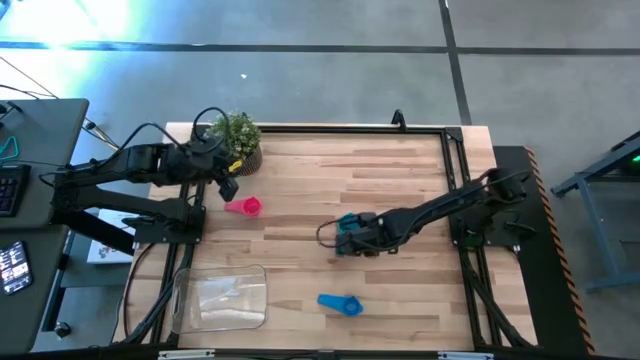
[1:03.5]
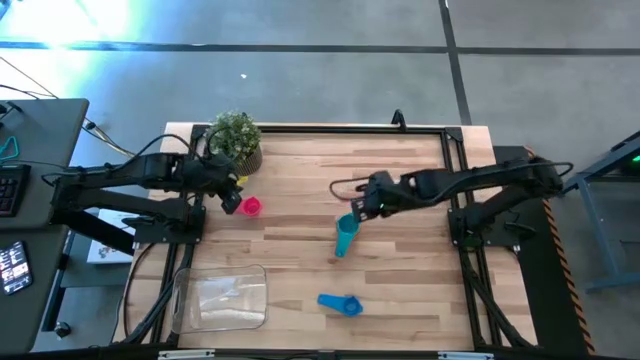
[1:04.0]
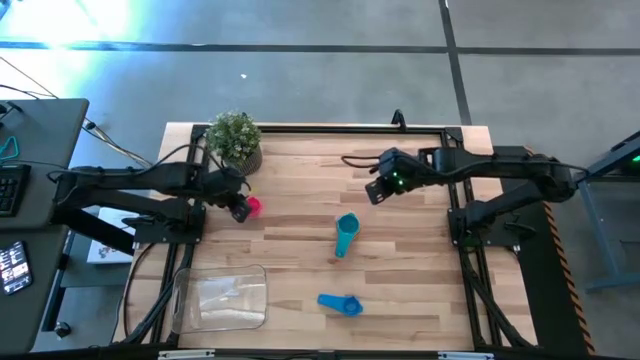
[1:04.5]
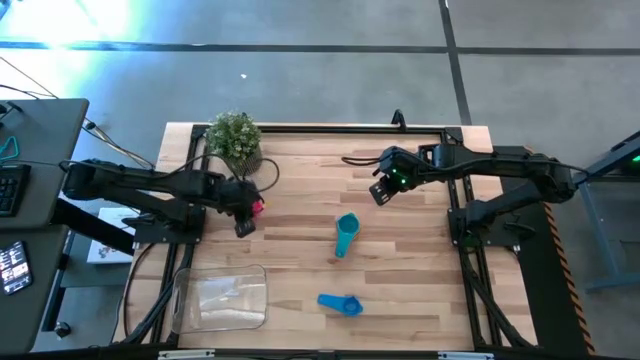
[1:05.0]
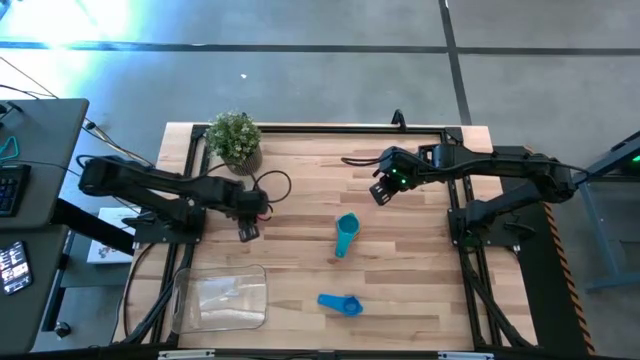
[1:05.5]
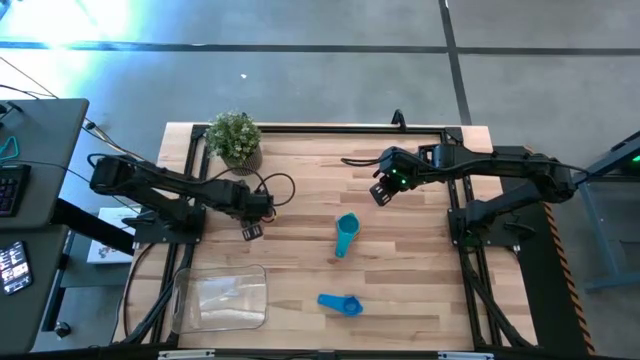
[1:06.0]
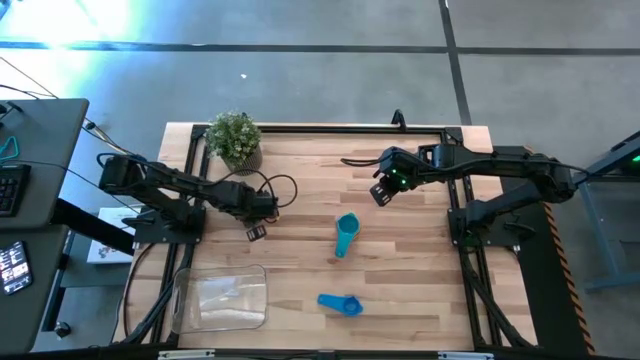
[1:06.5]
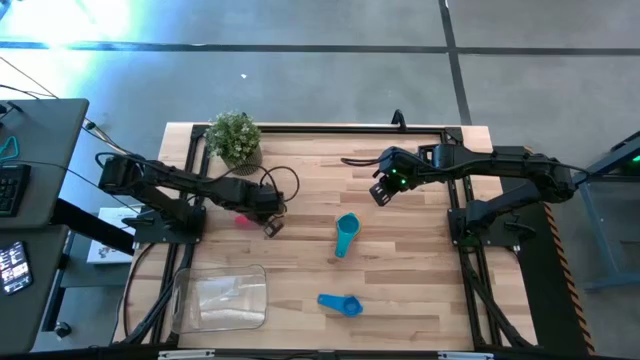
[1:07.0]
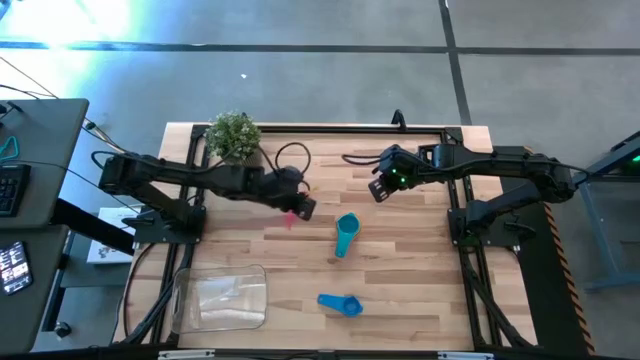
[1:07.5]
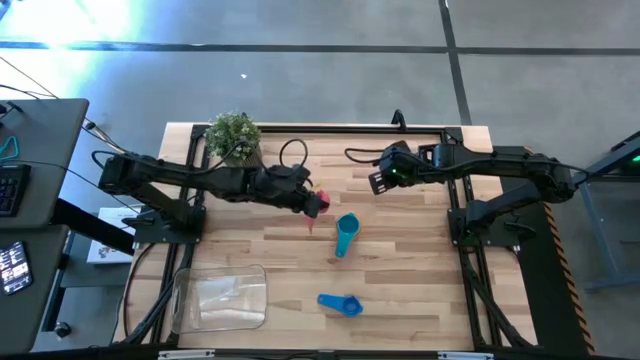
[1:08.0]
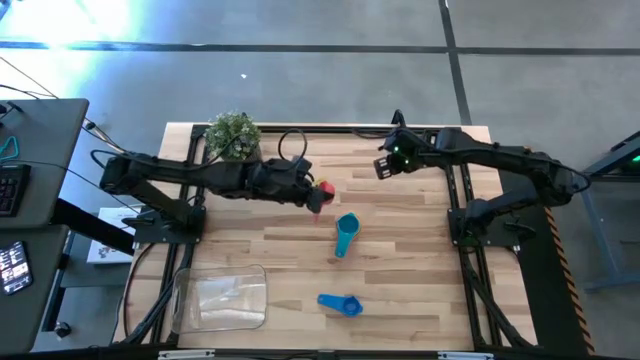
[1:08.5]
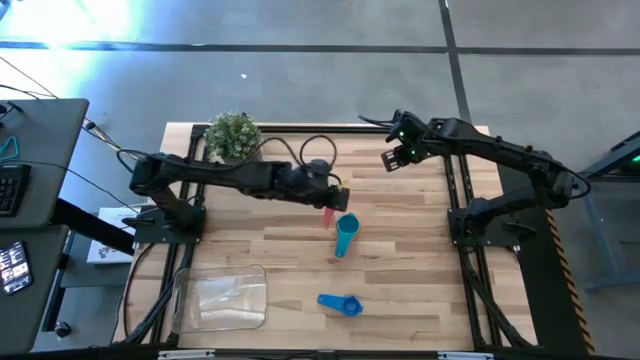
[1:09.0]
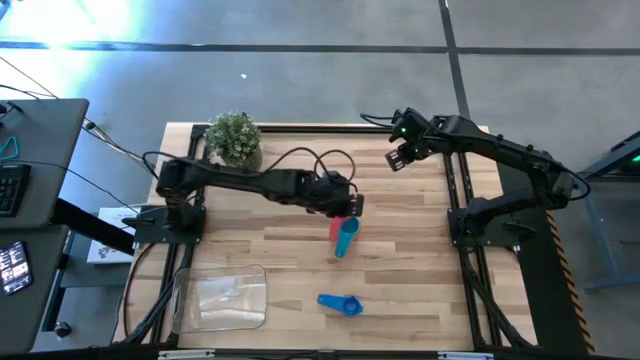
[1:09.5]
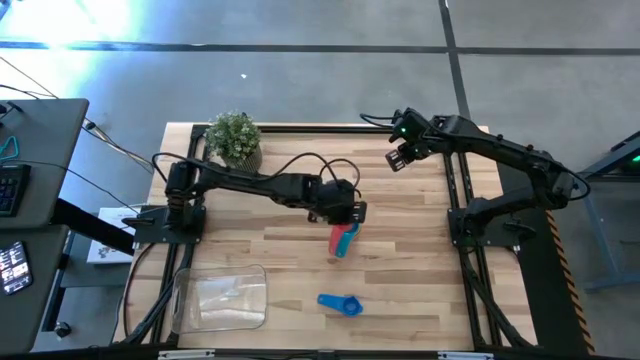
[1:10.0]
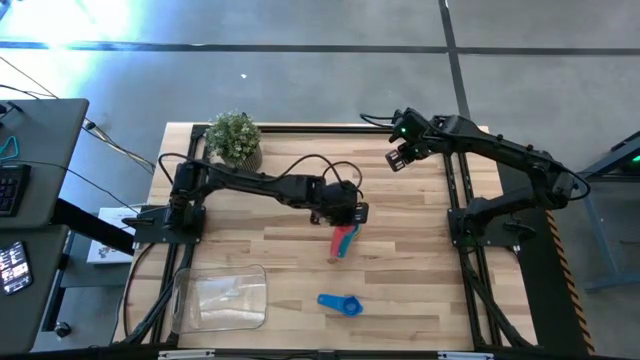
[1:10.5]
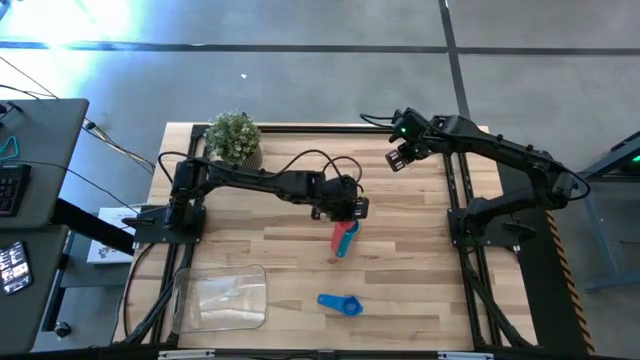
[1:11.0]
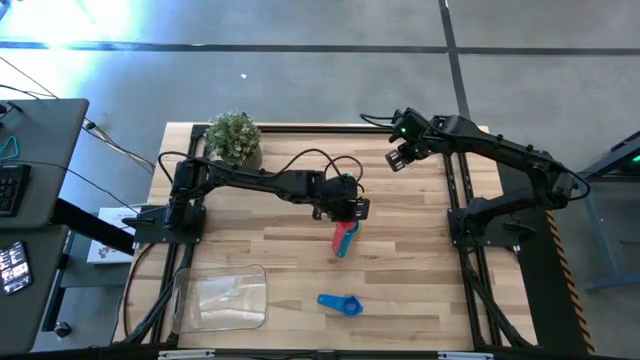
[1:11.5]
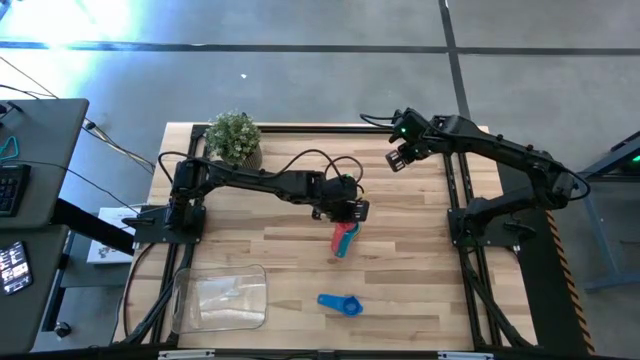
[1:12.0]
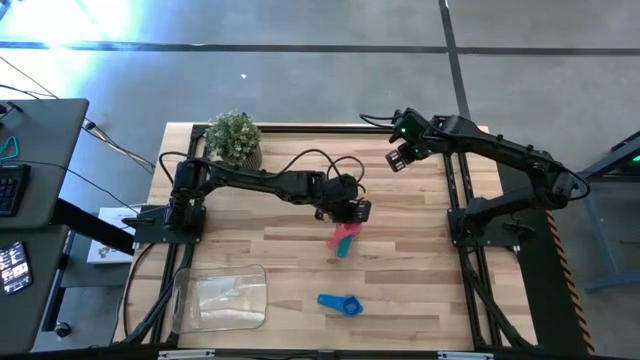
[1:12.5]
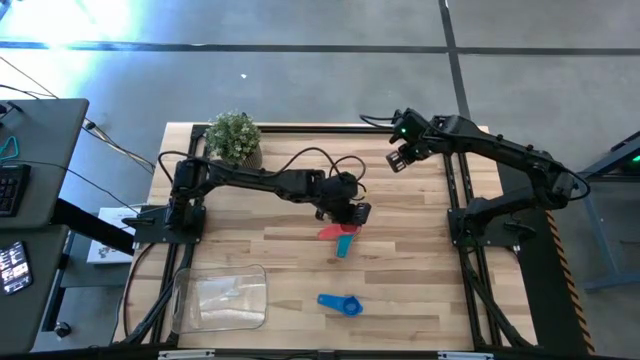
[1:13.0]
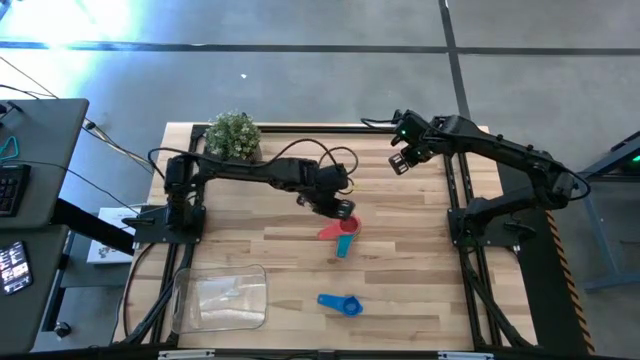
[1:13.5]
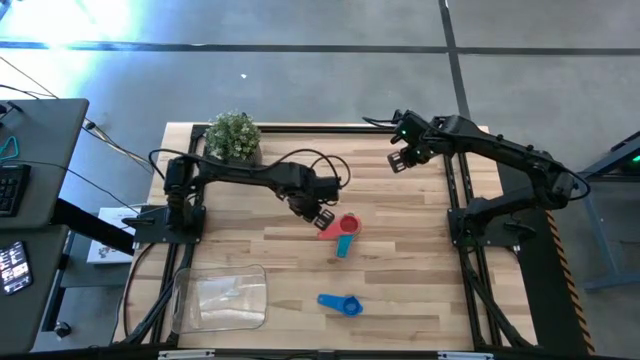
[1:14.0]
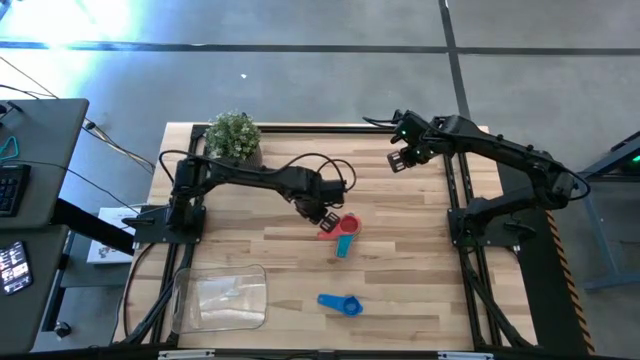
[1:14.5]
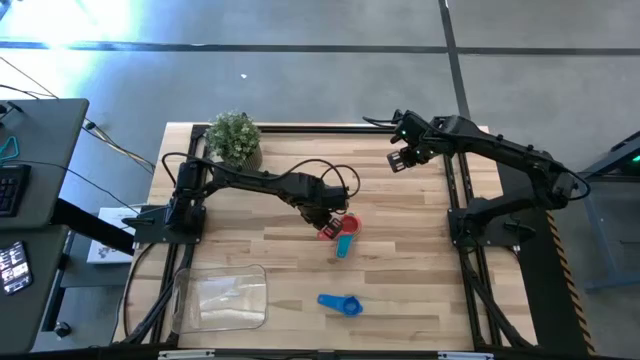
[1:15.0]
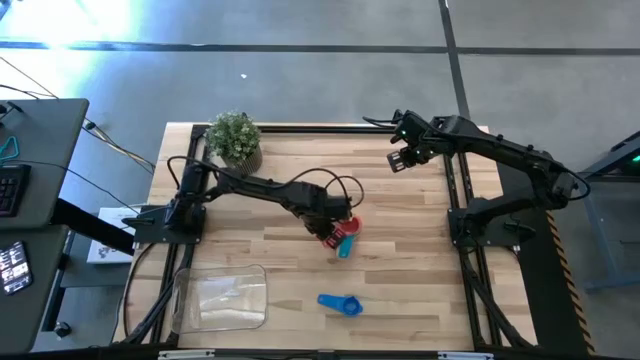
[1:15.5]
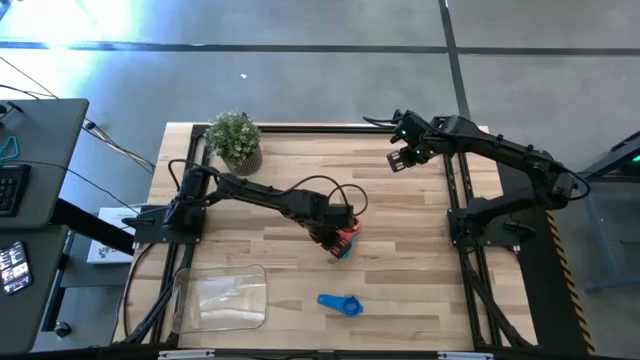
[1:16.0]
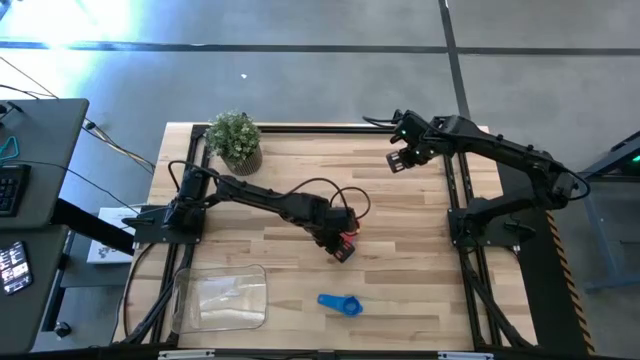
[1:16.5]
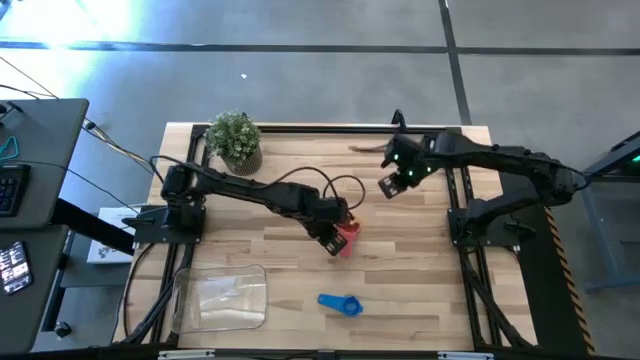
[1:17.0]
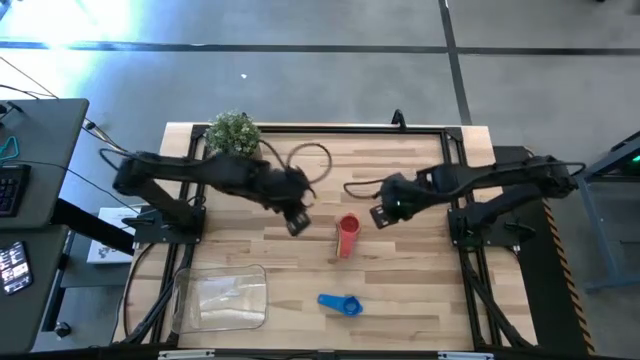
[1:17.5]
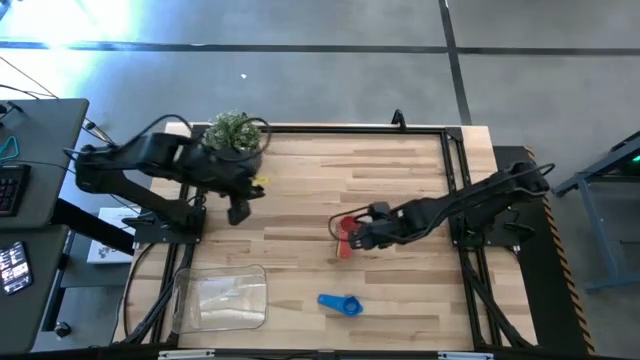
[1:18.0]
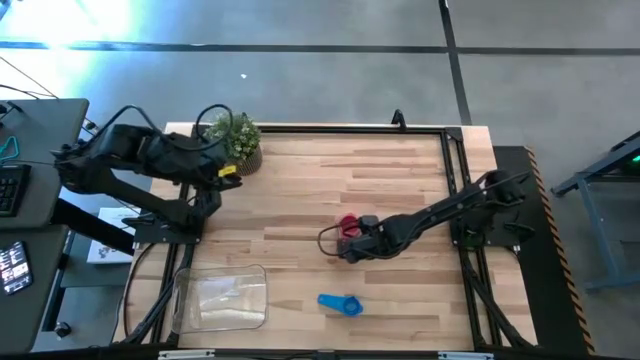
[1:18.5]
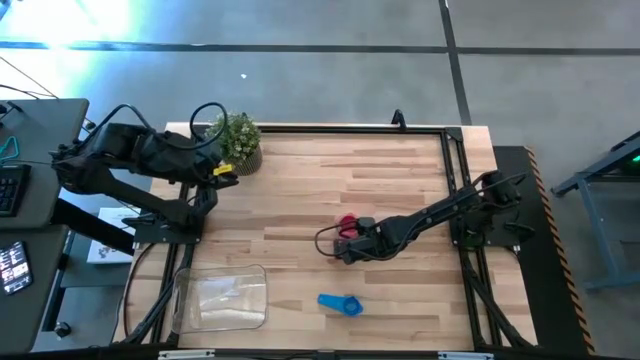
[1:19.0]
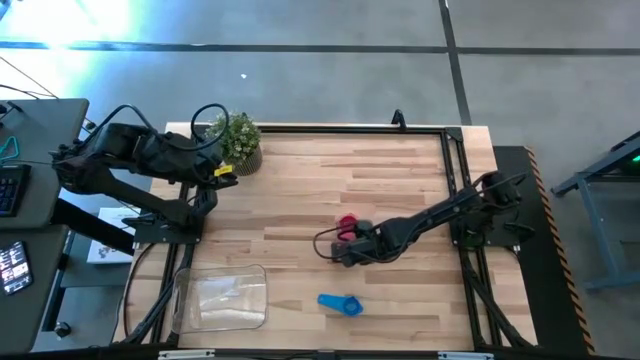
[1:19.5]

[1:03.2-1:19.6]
Task: Nest measuring cups in basket
Stack the red measuring cup on top of the light blue measuring cup

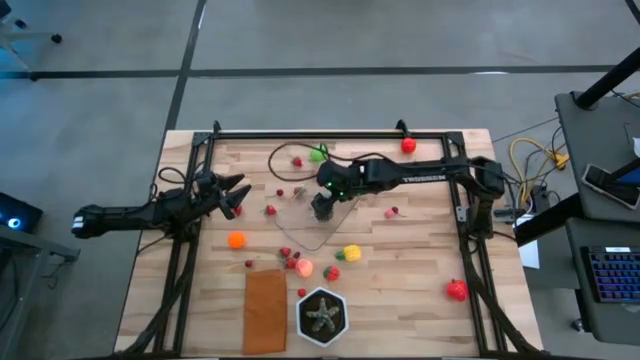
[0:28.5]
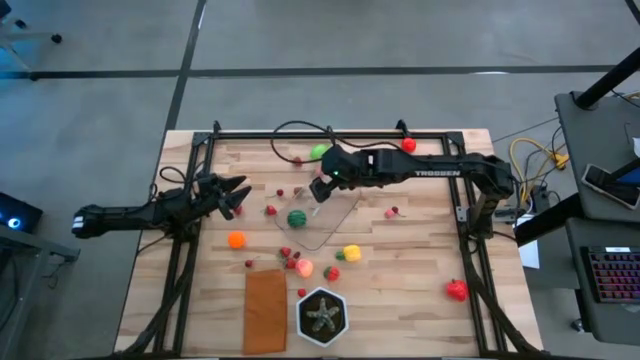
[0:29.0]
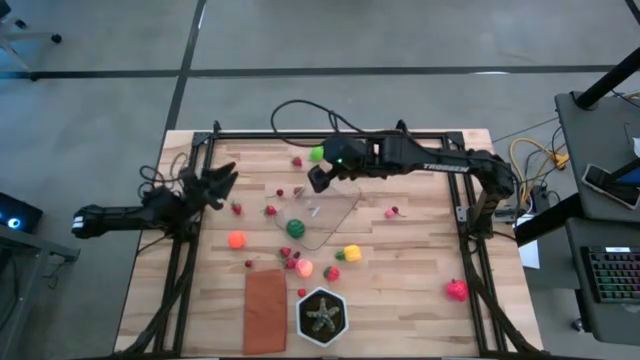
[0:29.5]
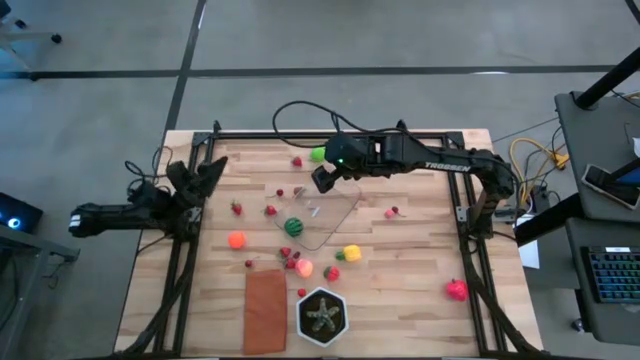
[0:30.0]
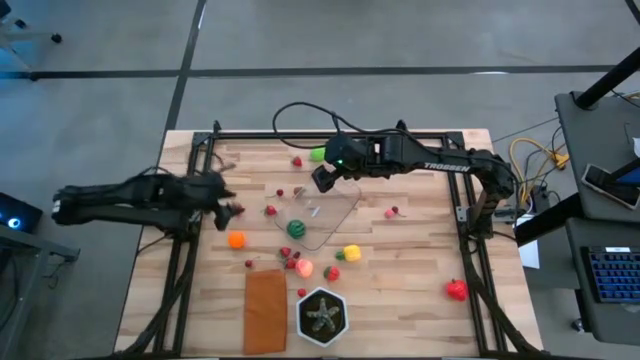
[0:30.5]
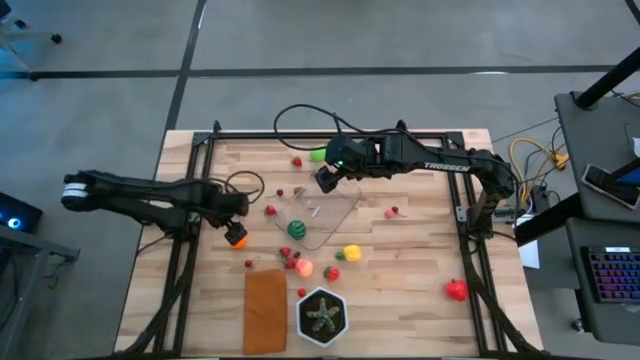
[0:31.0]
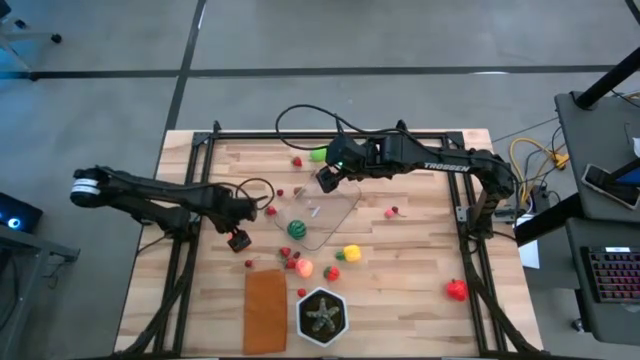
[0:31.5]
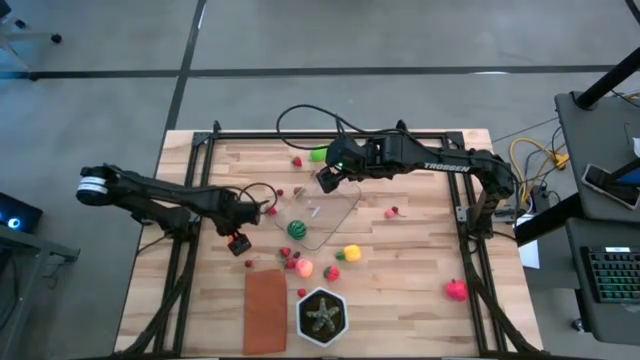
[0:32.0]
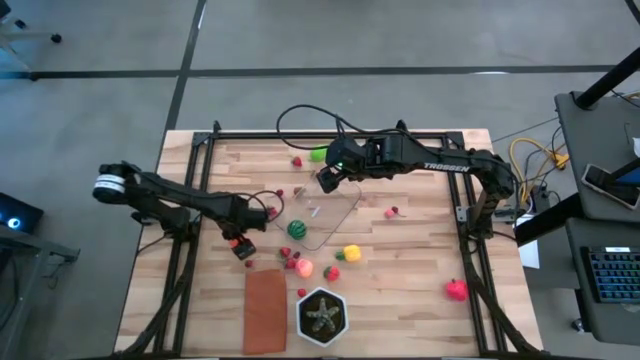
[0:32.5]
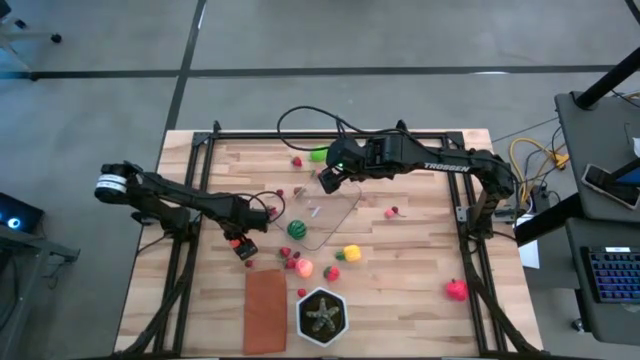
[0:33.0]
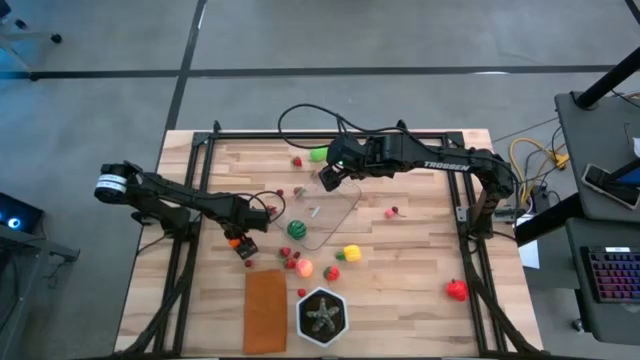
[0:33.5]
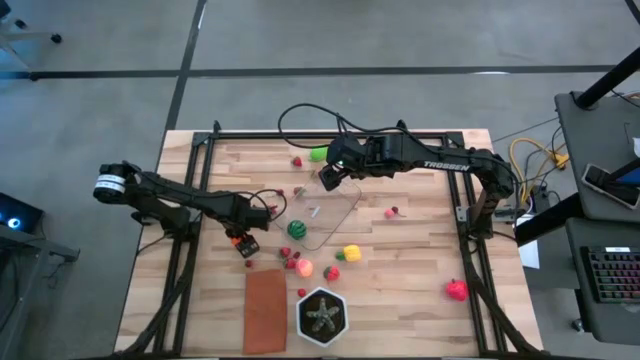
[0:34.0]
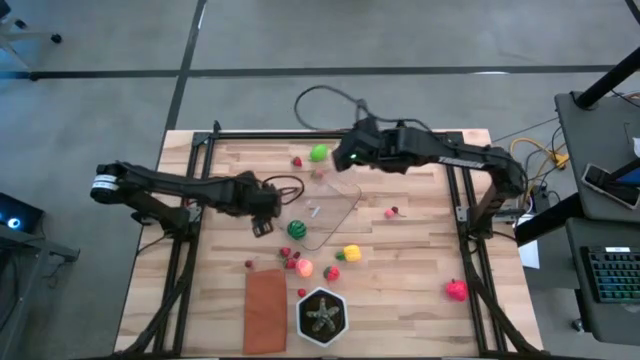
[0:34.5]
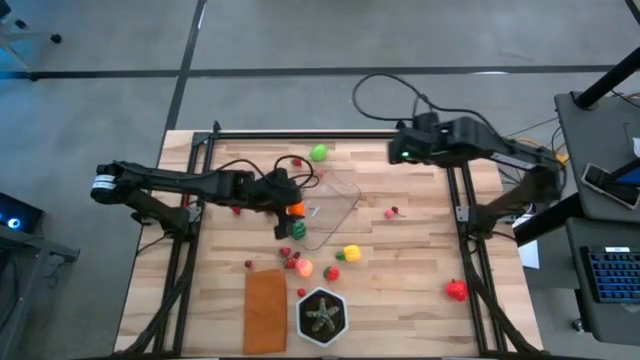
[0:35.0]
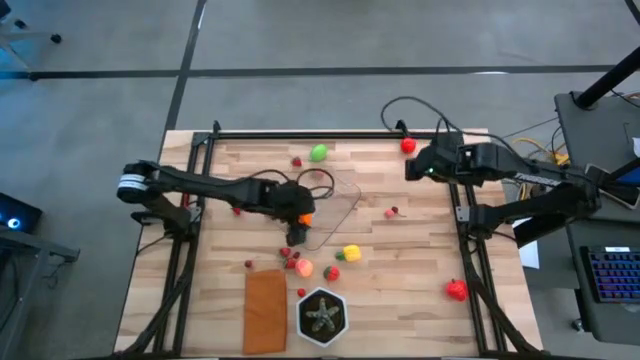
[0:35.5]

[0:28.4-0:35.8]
Task: Pick and placing Produce into tupperware
Put the orange into the transparent bin
